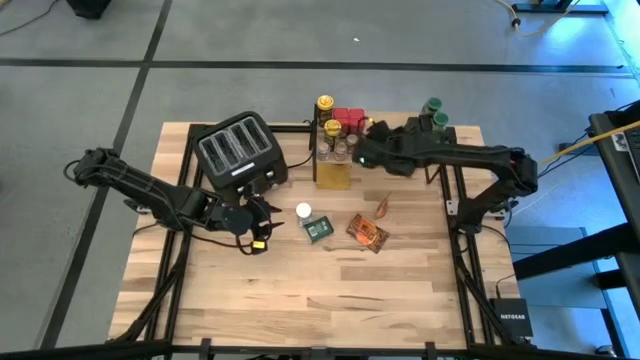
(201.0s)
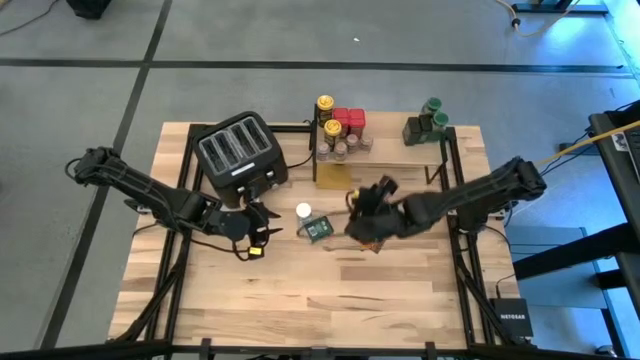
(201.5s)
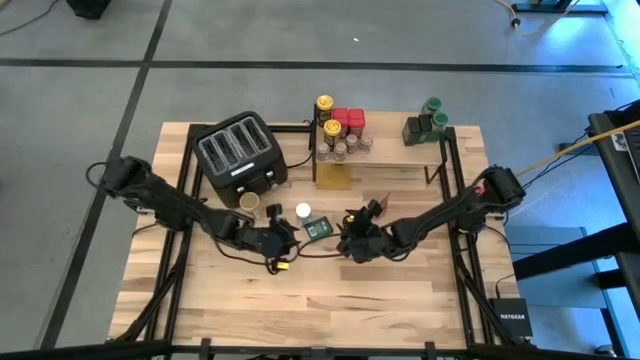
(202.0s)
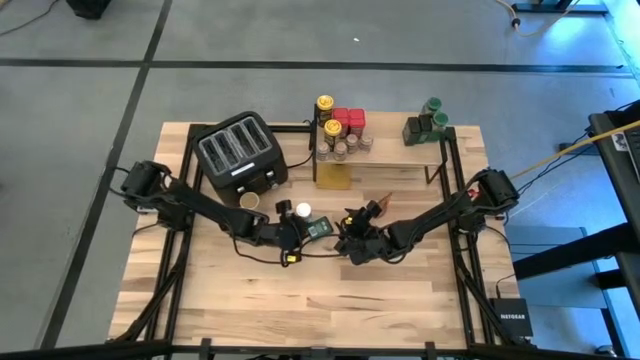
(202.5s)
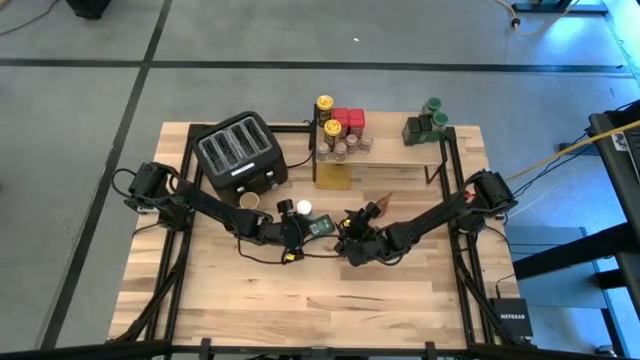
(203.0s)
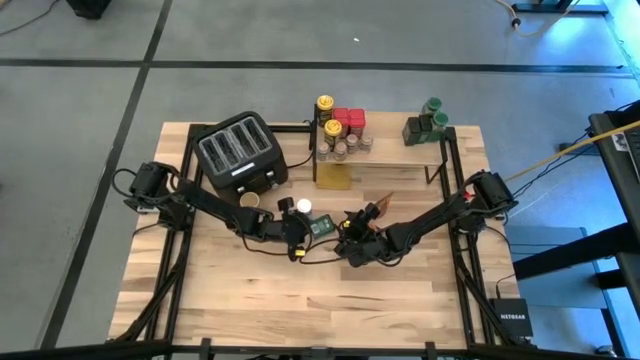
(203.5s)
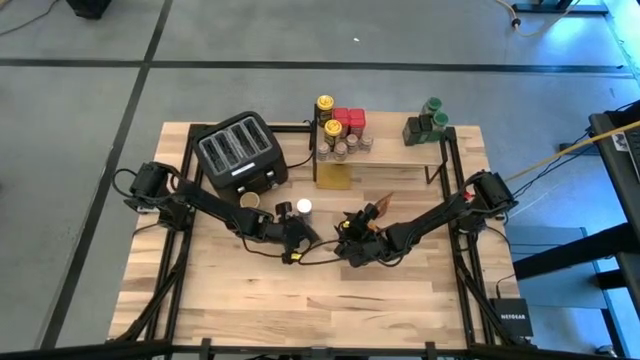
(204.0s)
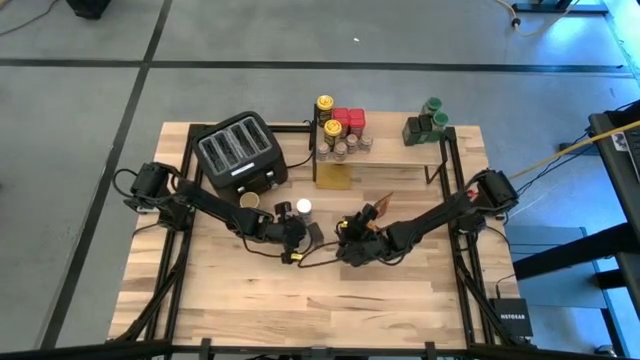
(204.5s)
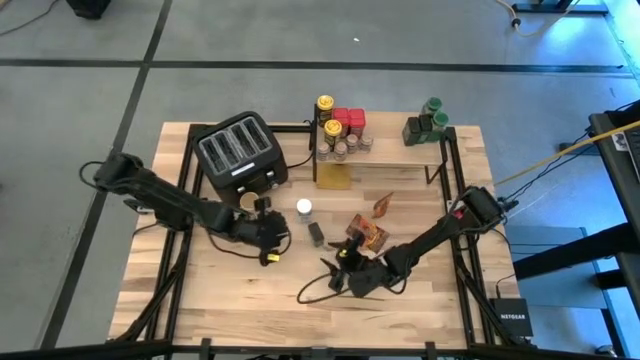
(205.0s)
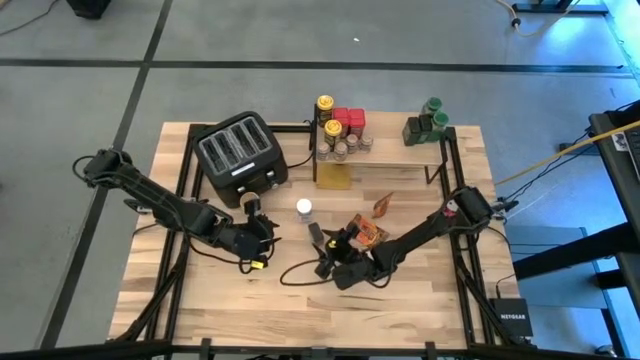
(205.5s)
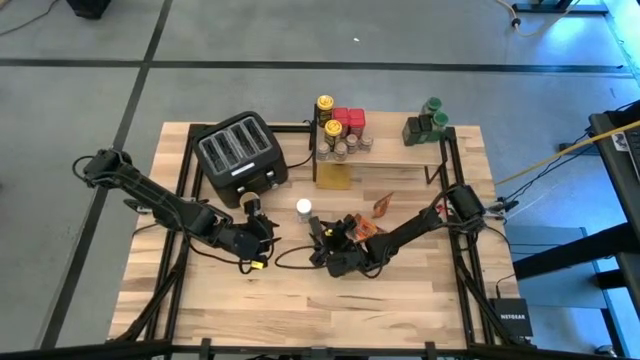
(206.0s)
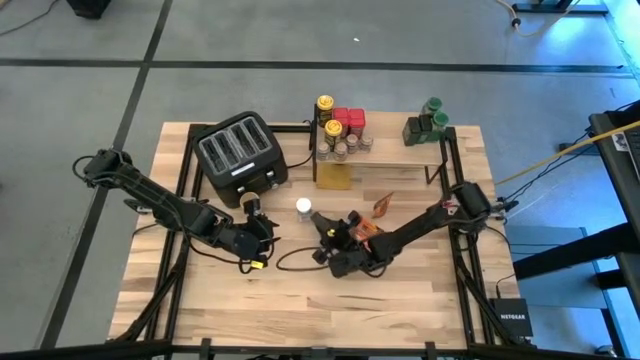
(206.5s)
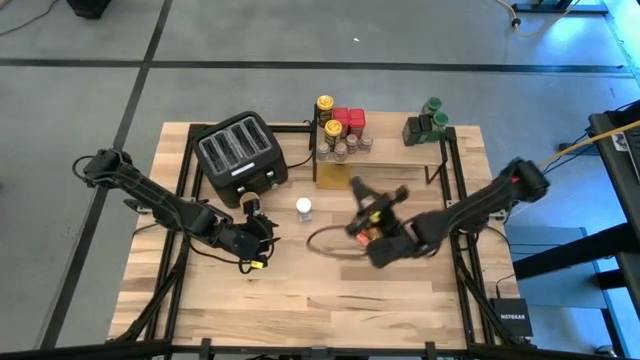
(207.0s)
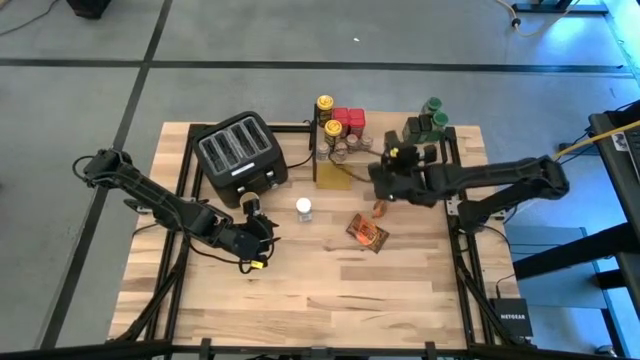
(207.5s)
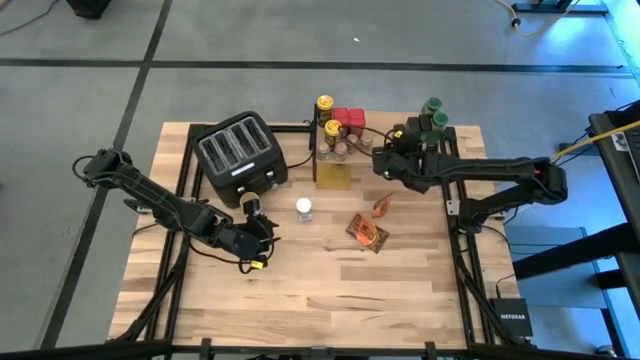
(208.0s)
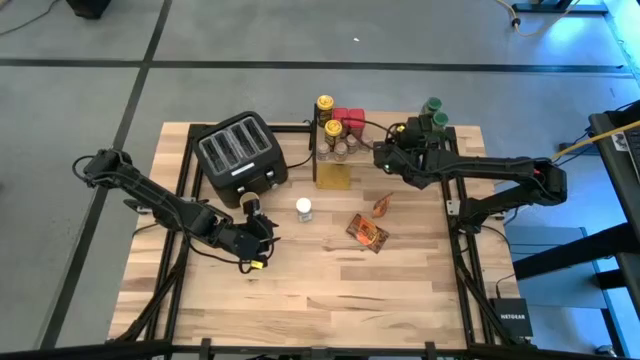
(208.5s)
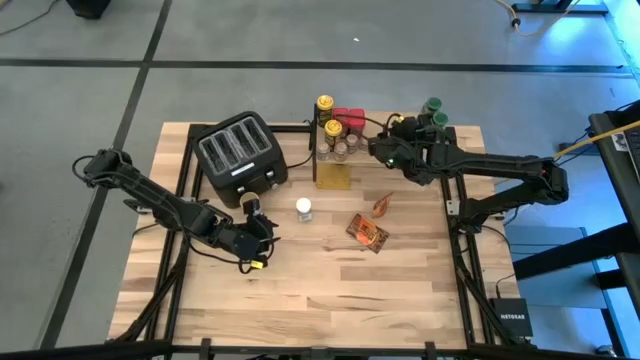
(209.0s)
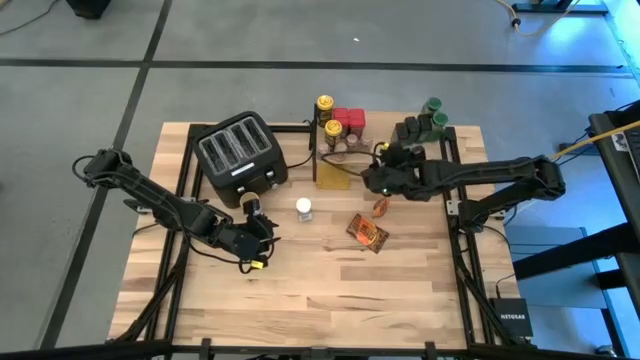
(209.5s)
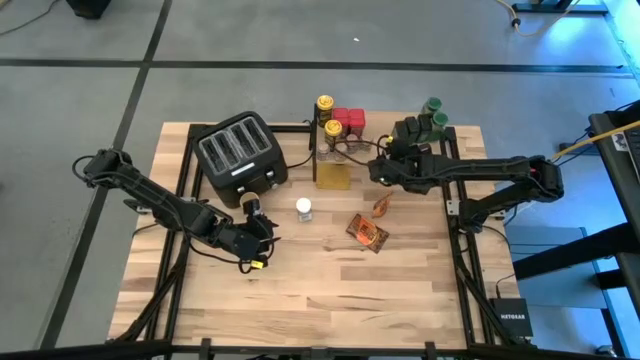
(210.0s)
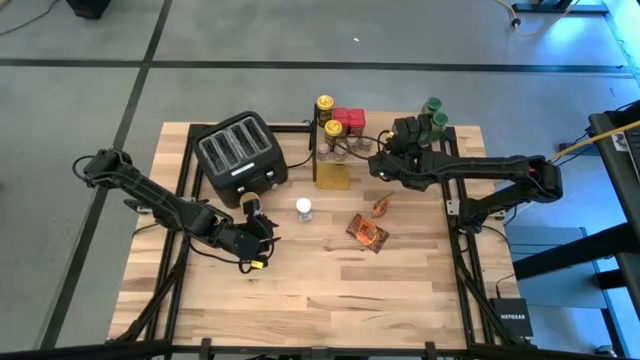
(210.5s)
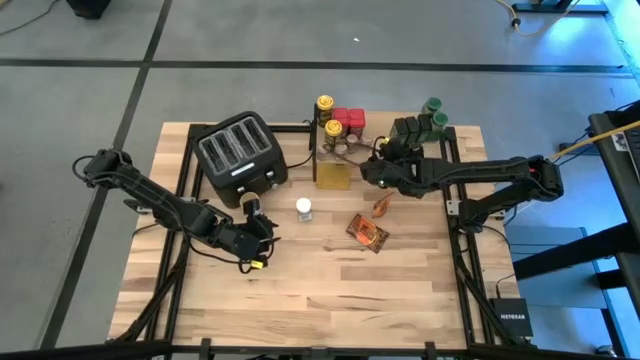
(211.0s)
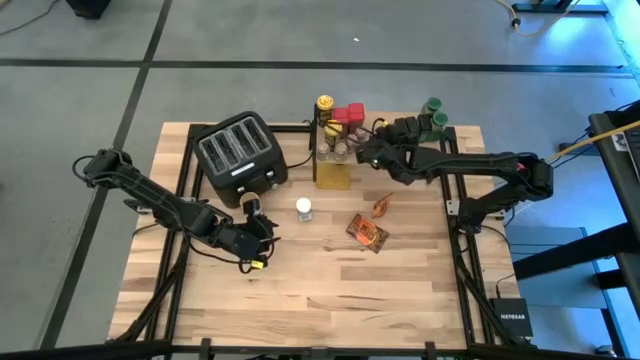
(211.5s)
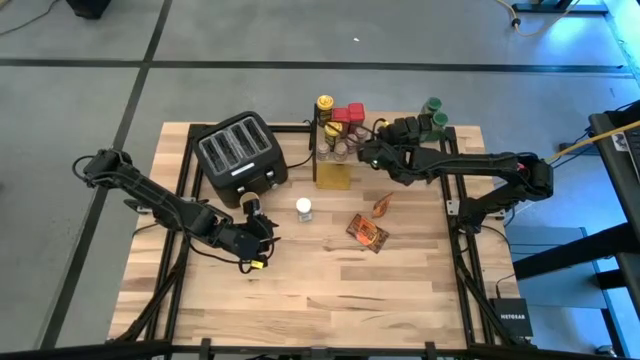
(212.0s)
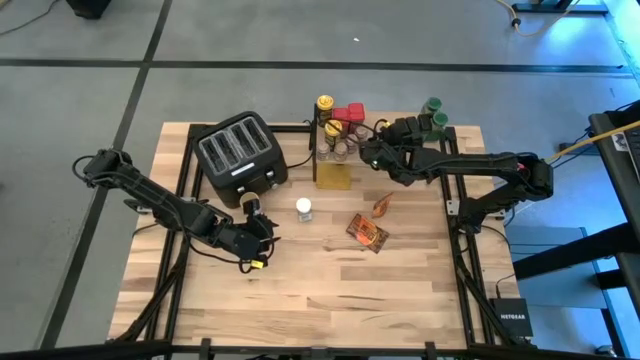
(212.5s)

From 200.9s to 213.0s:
Task: Shelf spices
Put the green seasoning can on the shelf

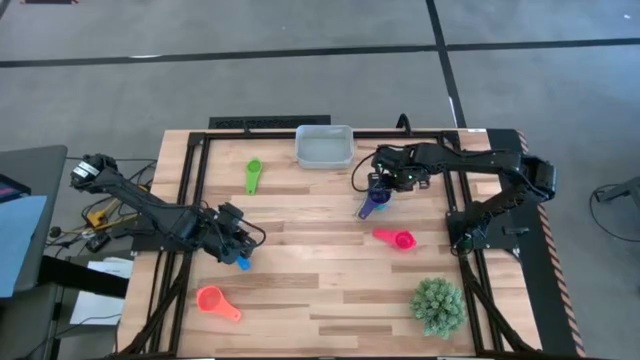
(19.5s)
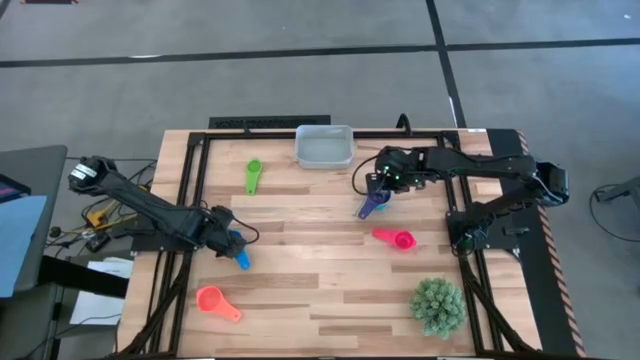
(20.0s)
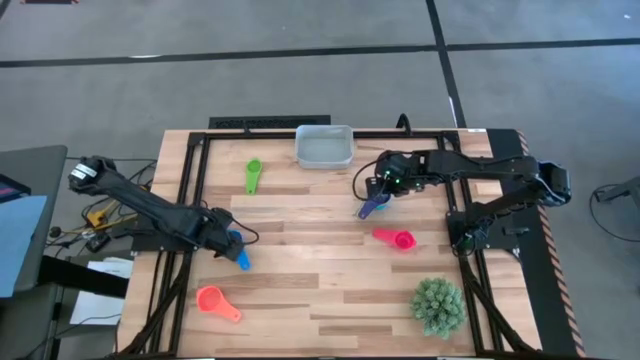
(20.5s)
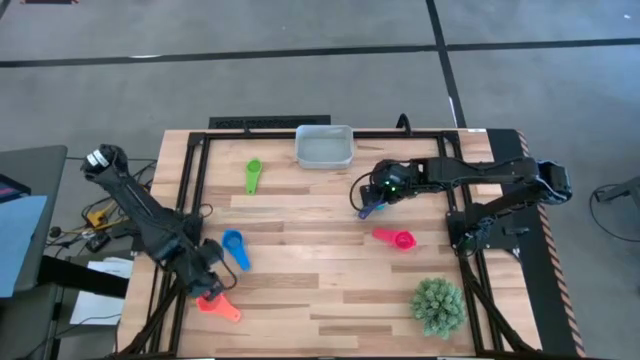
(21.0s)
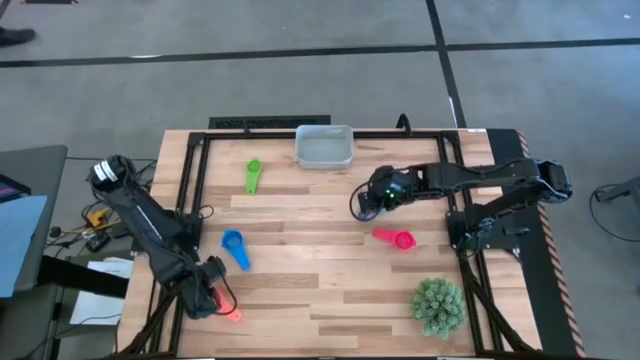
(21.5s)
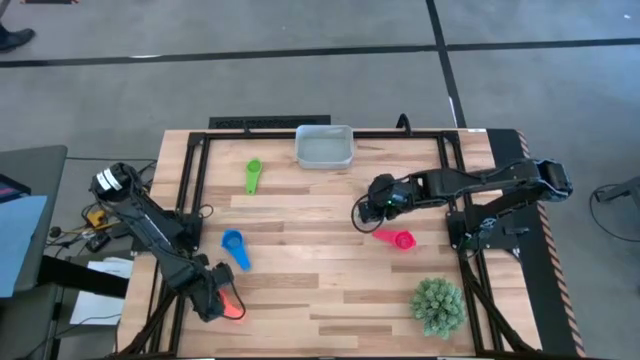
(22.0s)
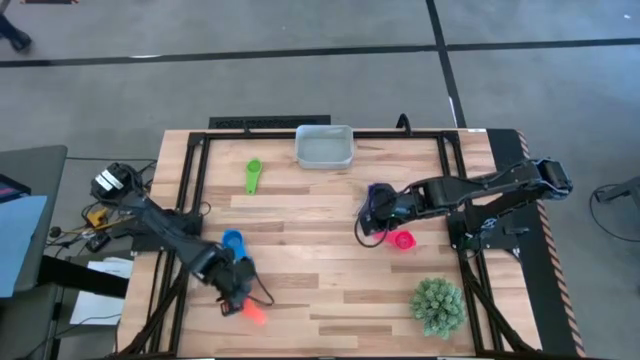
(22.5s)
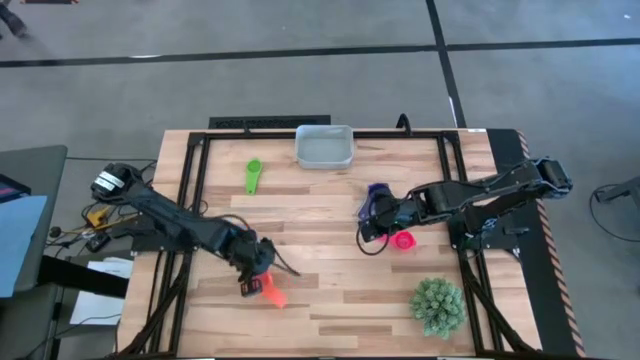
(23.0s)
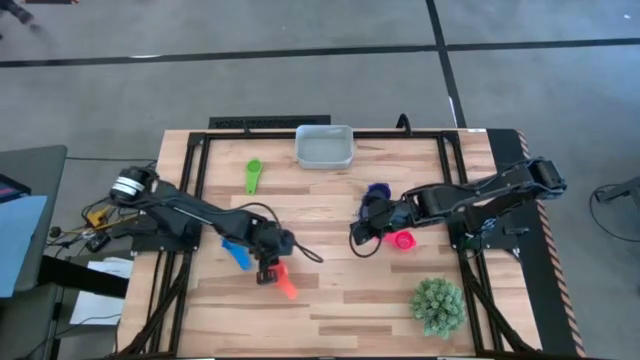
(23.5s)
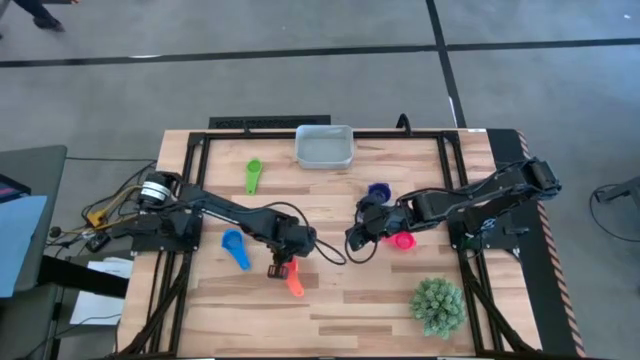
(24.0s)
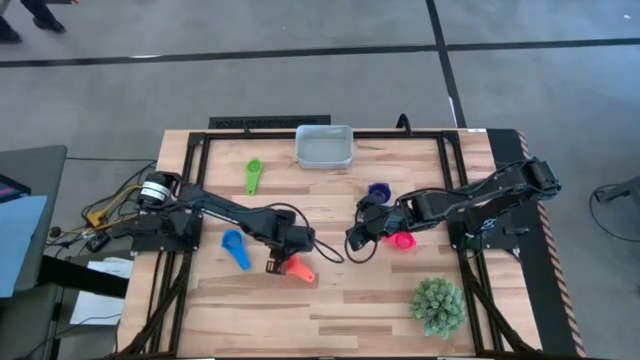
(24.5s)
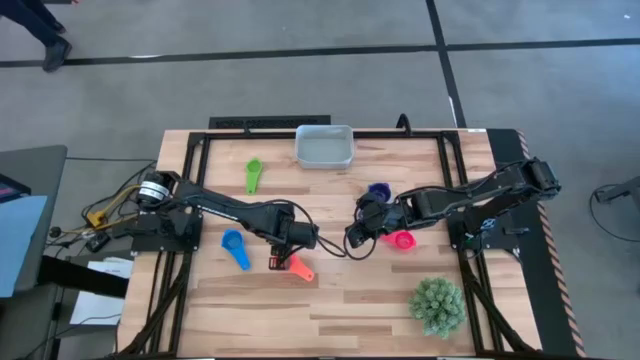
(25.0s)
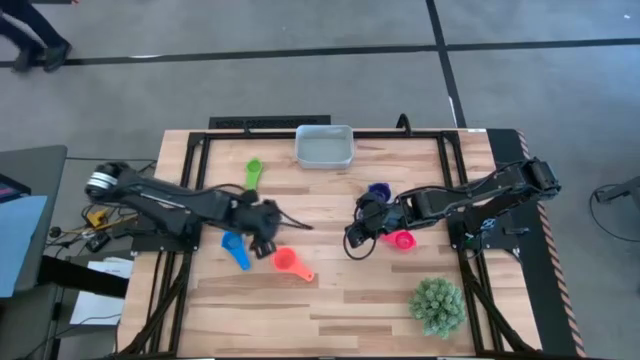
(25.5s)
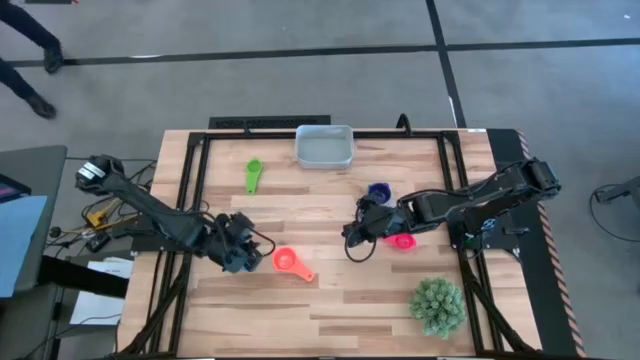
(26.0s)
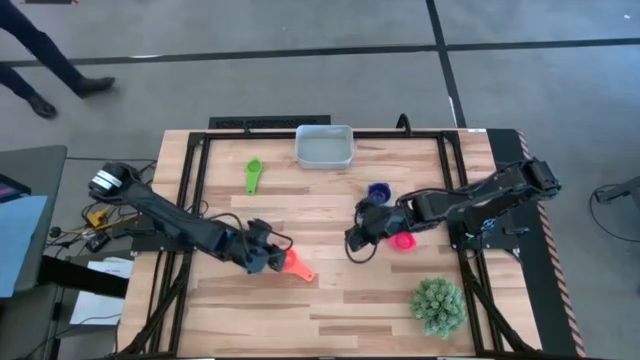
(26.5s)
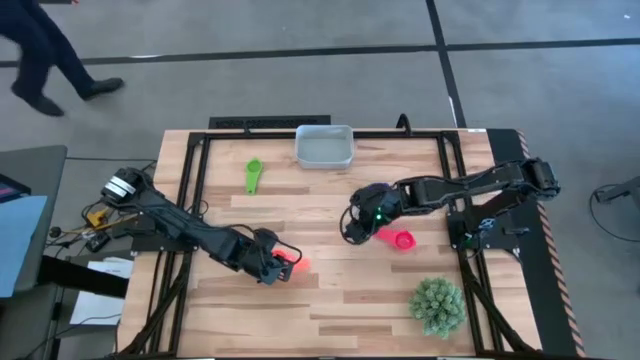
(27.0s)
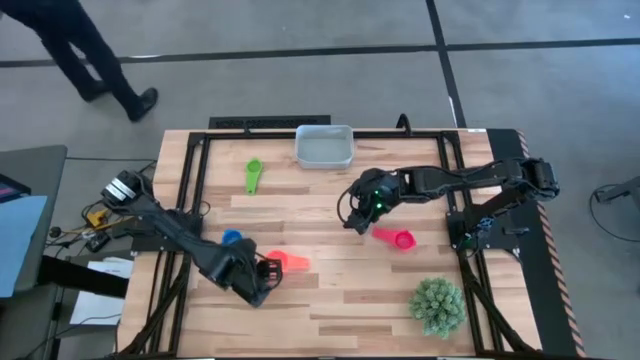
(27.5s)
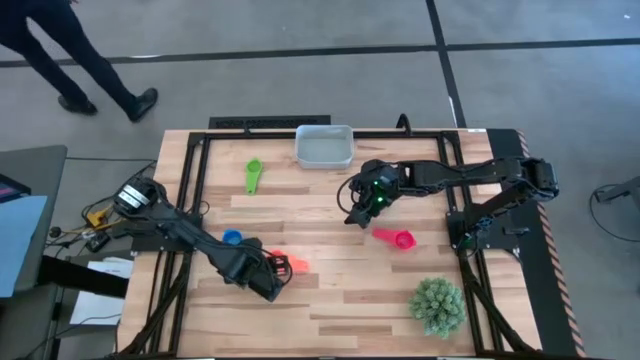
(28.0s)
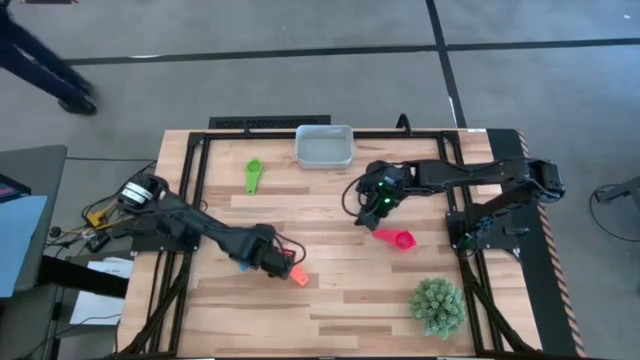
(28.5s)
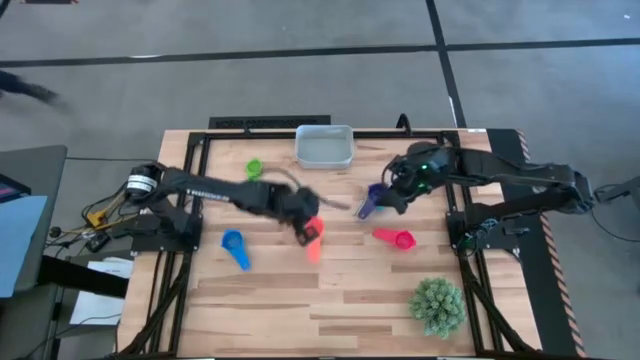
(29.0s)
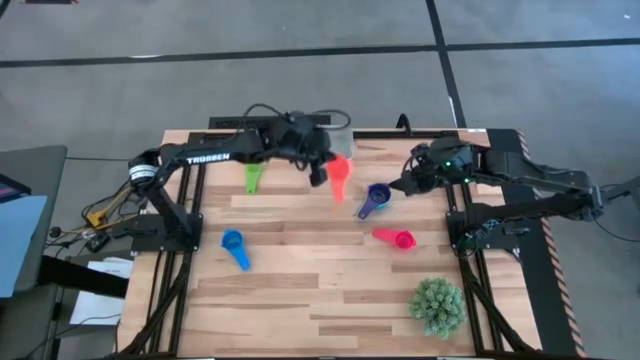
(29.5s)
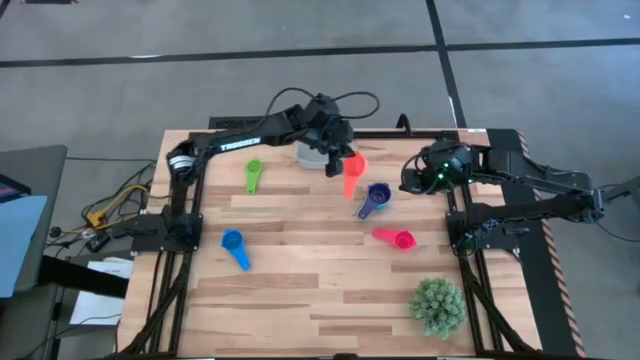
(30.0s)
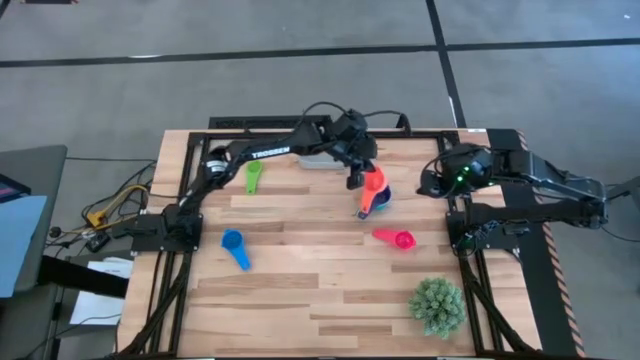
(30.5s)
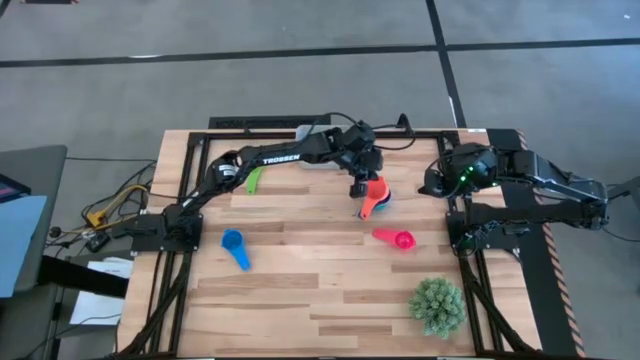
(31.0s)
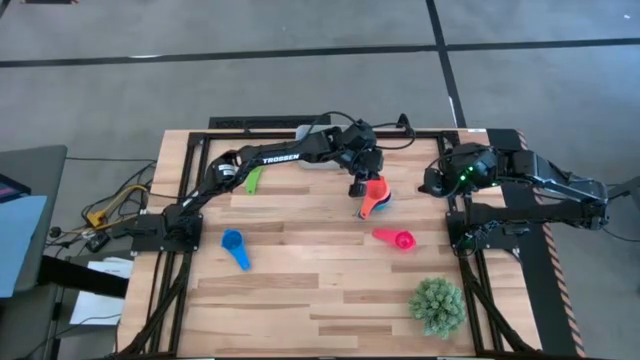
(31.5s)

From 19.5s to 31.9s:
Task: Nest measuring cups in basket
Stack the orange measuring cup on top of the purple measuring cup
